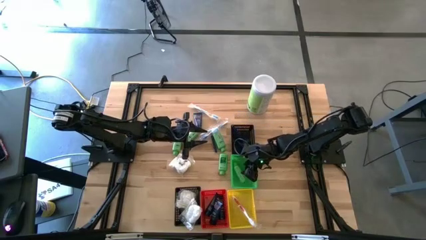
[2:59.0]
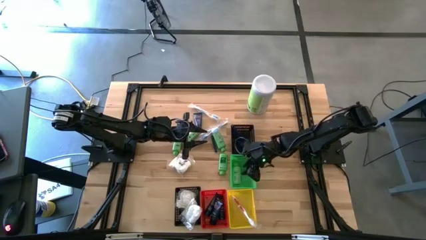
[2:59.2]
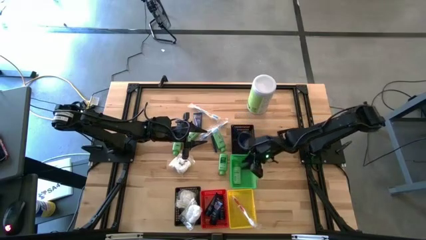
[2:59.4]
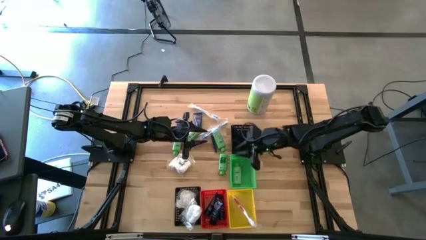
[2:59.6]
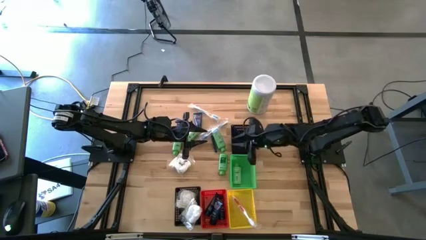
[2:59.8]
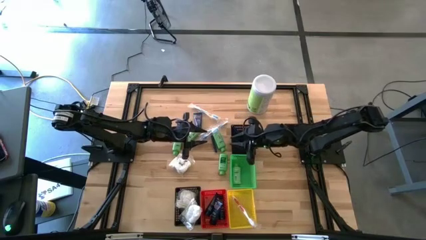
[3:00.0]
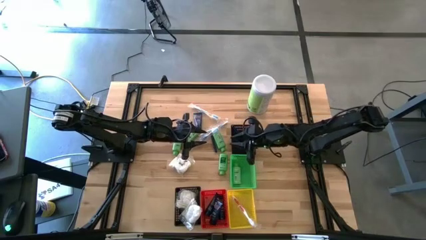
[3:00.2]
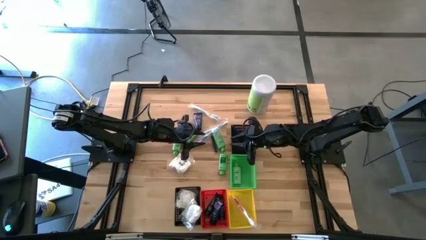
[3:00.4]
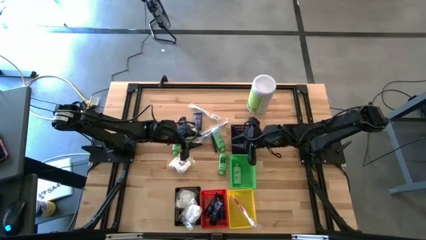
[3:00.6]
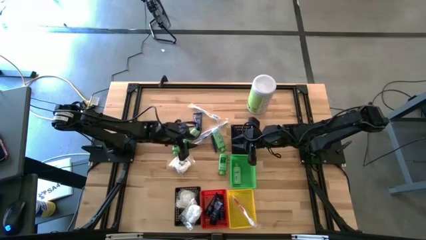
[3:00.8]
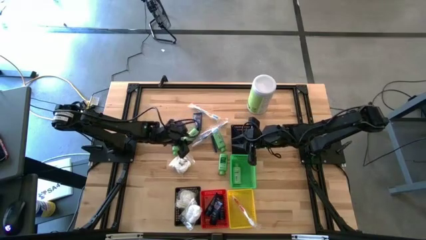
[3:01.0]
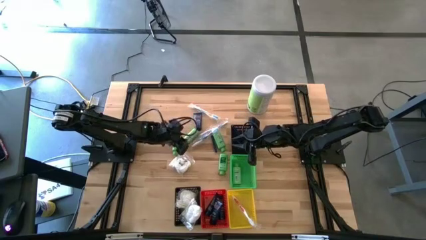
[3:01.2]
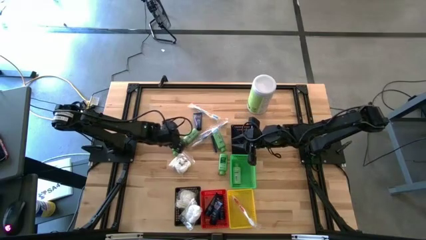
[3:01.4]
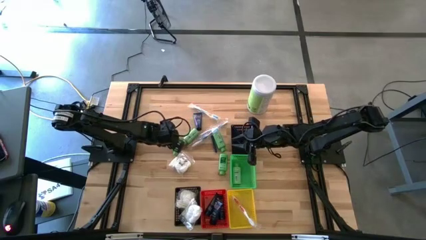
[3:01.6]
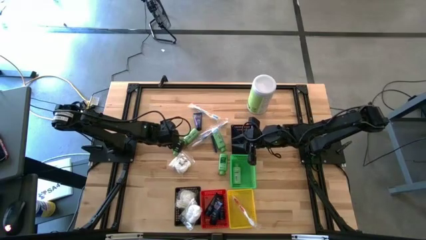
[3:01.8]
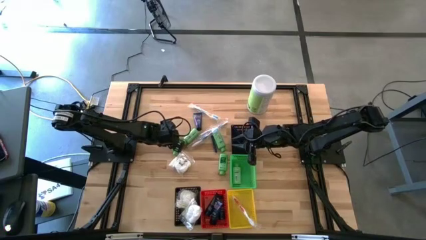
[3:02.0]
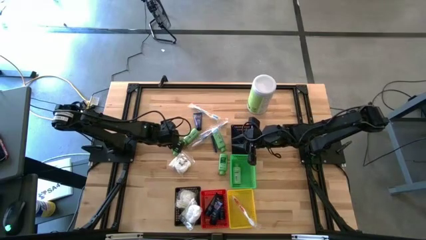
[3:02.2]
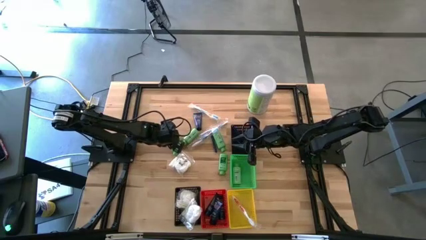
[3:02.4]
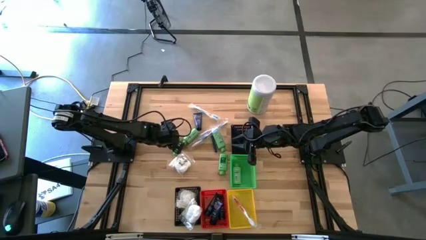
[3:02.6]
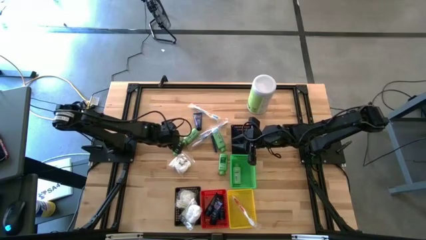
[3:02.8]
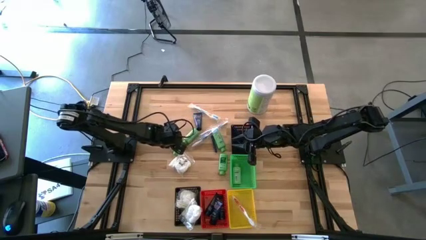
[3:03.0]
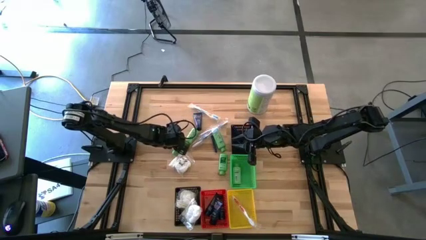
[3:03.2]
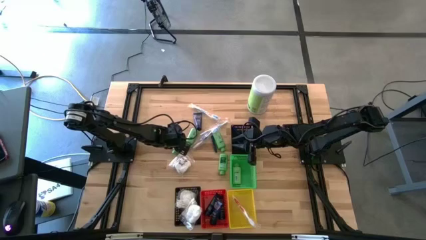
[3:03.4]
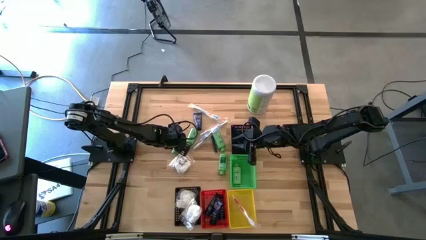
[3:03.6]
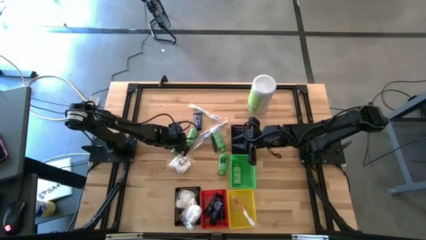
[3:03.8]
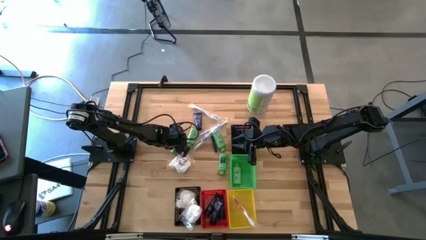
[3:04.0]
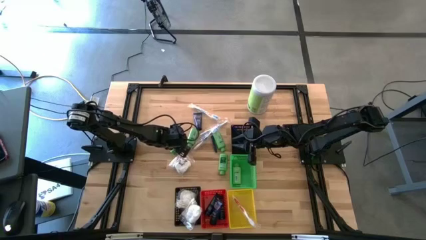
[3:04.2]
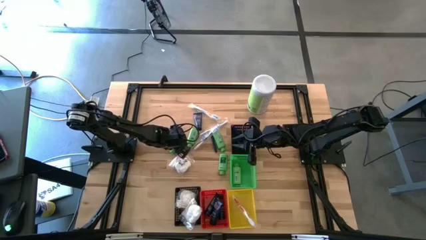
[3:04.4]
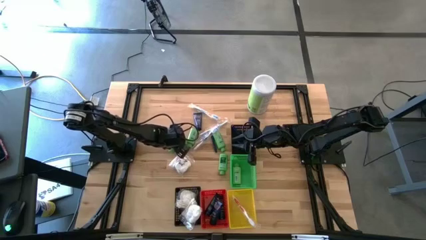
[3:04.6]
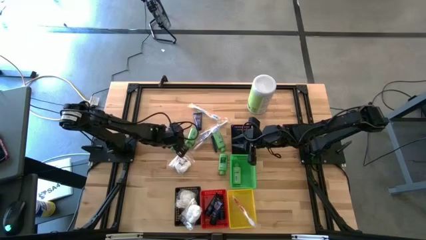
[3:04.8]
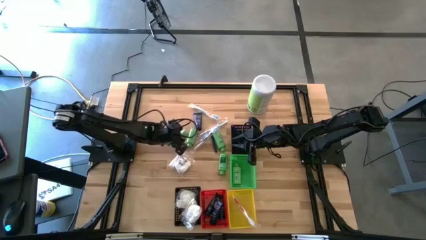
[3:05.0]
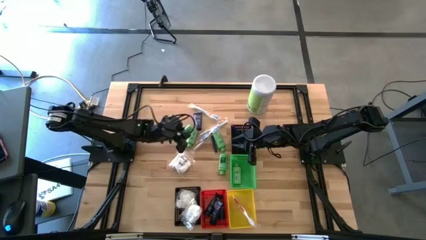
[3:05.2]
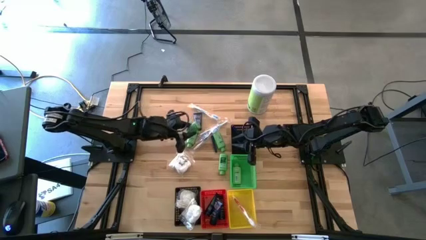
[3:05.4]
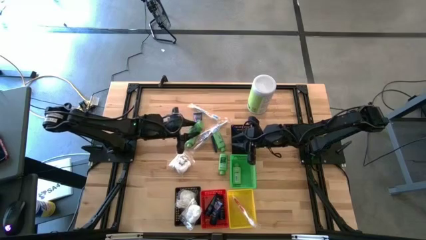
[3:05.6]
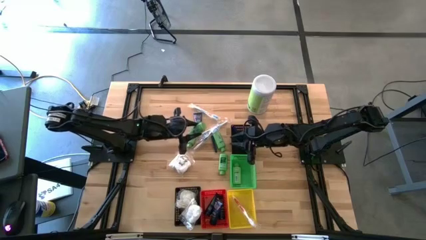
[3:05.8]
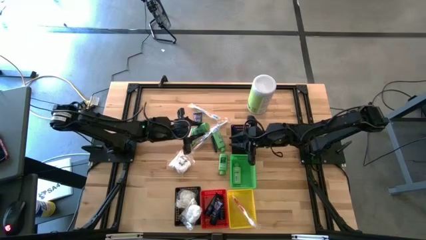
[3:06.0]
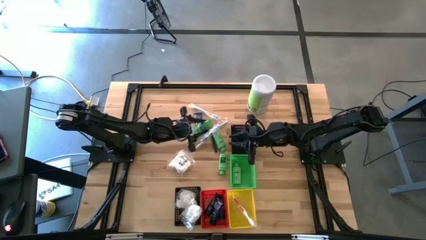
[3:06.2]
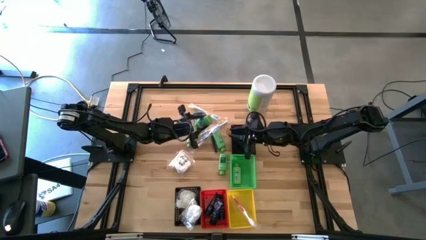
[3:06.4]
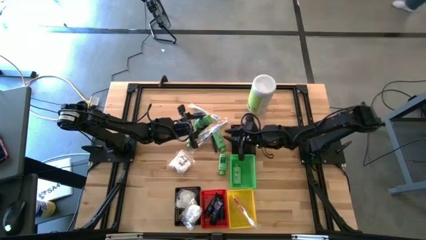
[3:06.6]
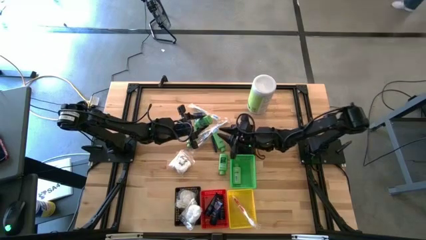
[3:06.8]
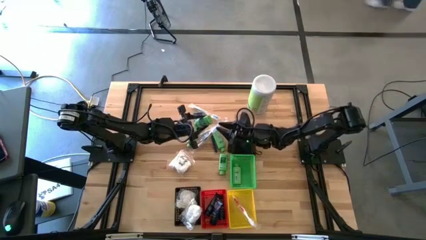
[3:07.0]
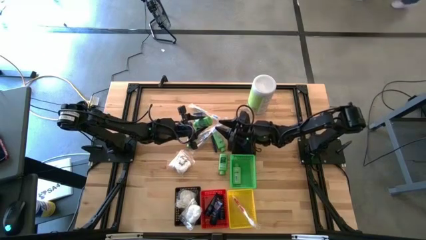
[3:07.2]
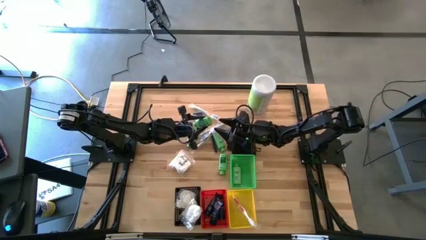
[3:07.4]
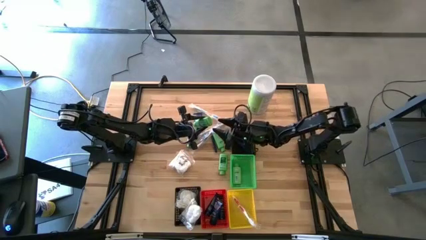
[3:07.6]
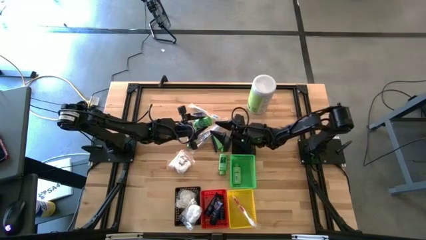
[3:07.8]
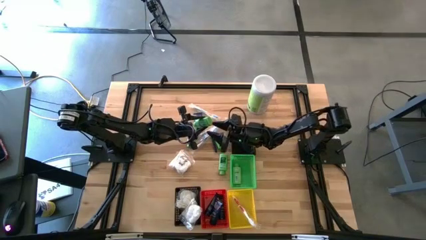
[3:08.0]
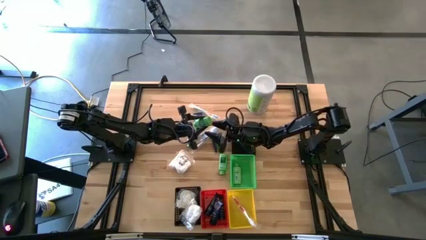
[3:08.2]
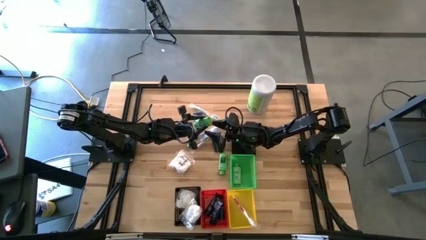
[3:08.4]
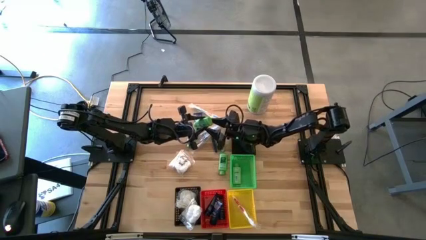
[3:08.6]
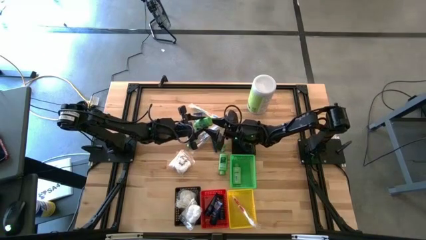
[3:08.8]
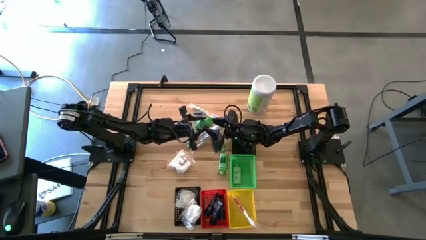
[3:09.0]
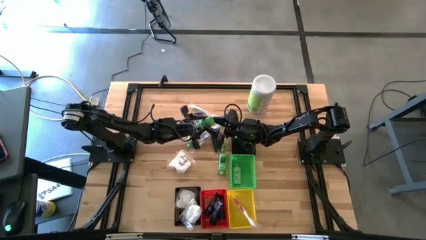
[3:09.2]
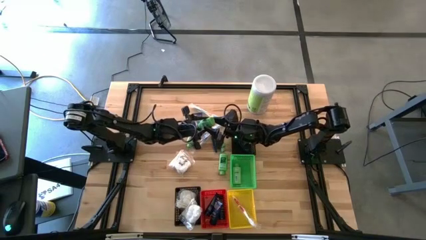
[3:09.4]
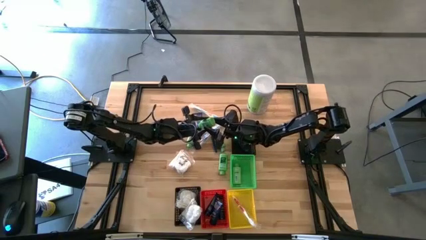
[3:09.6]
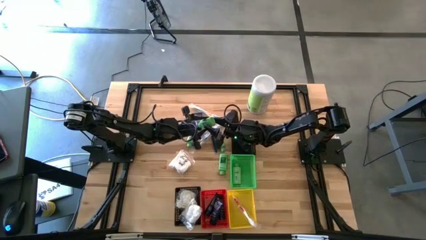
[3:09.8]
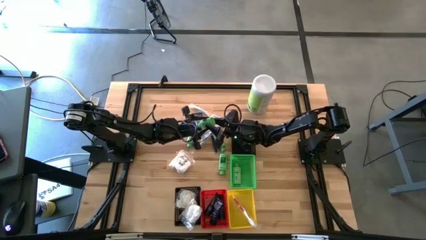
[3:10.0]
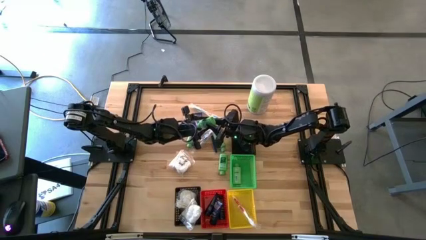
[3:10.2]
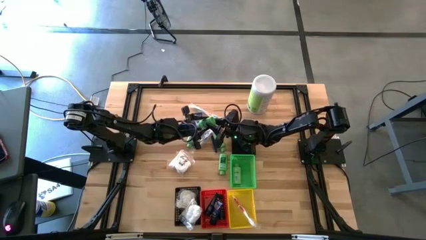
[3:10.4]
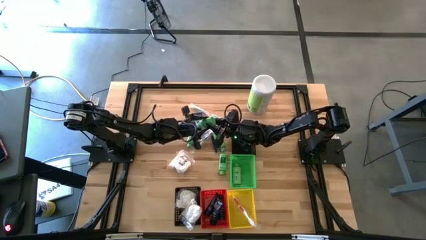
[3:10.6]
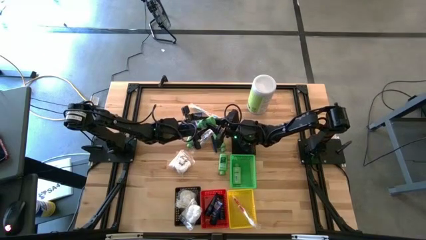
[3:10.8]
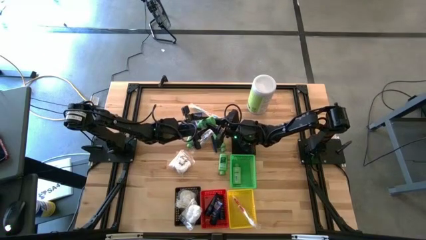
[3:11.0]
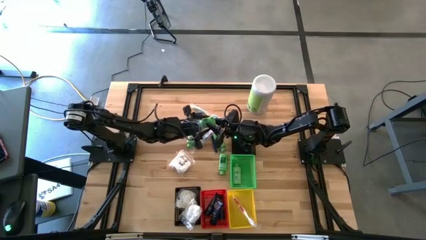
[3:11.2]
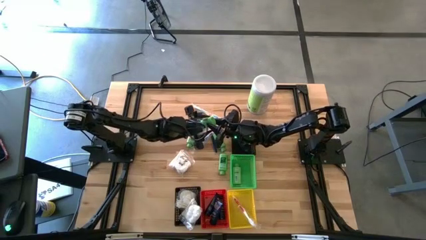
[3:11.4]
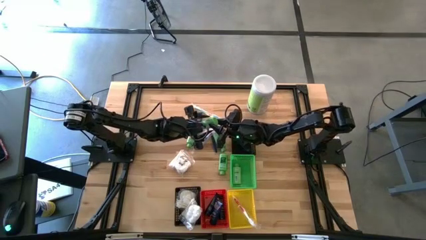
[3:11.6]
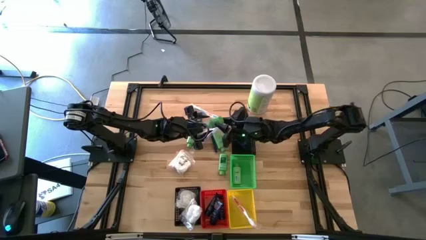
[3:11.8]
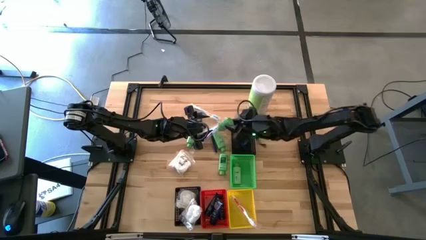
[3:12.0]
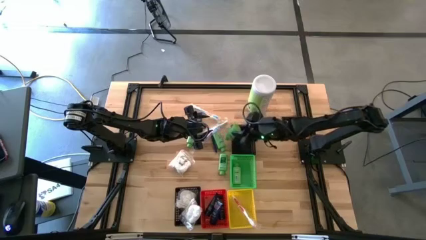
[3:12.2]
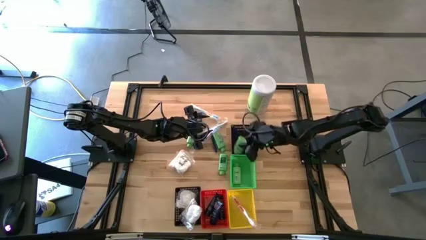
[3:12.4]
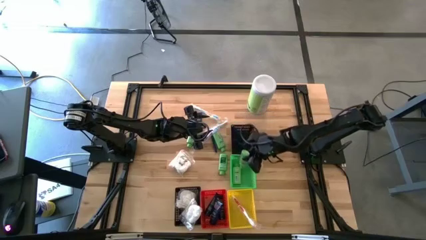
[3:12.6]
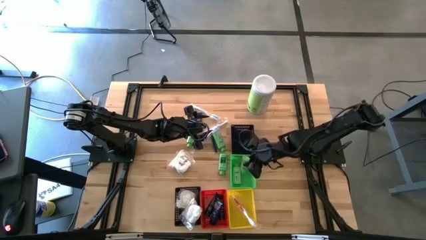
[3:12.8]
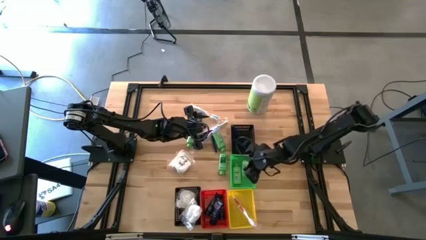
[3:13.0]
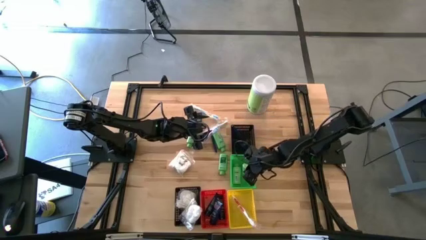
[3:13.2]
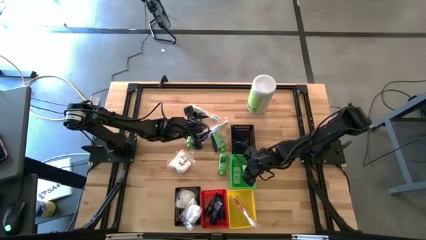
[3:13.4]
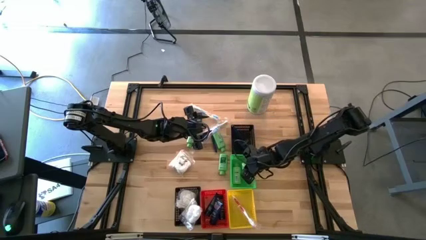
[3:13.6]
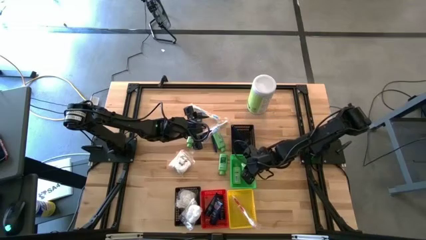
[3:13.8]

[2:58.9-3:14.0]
Task: Pick & Place Travel size toiletries
Put the green shampoo into the green bin

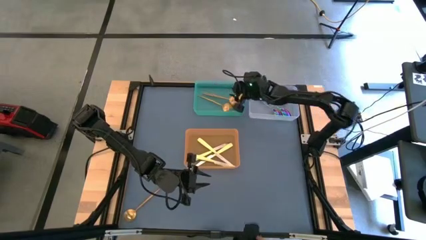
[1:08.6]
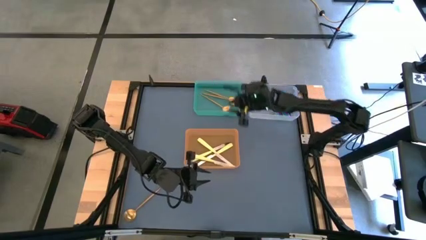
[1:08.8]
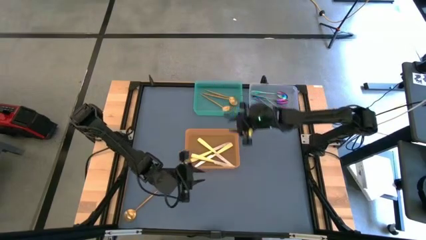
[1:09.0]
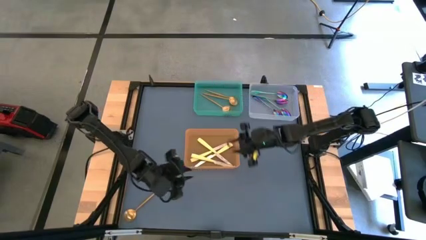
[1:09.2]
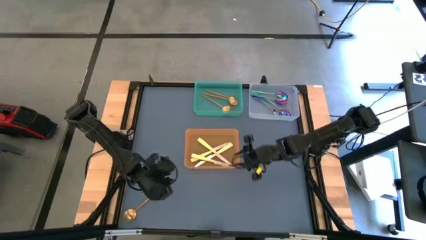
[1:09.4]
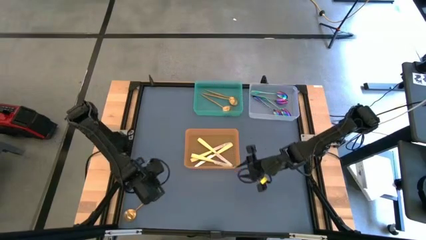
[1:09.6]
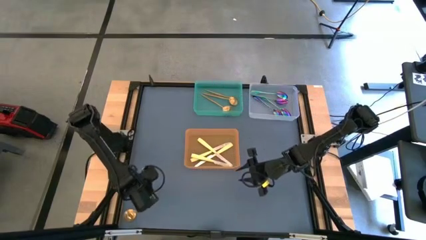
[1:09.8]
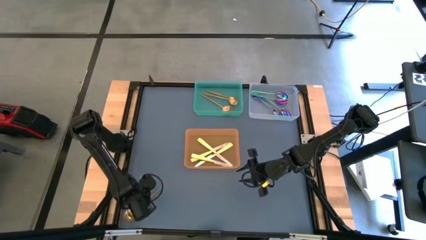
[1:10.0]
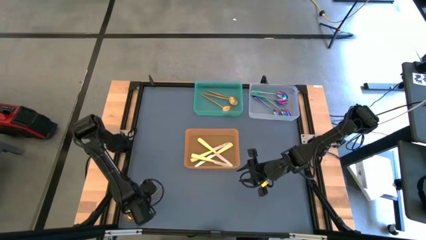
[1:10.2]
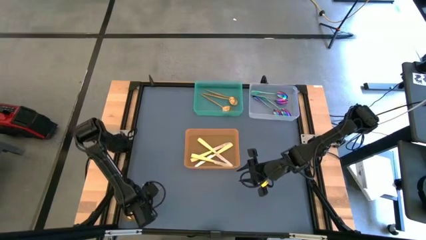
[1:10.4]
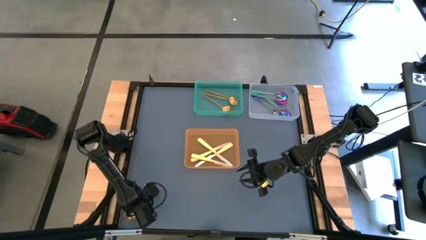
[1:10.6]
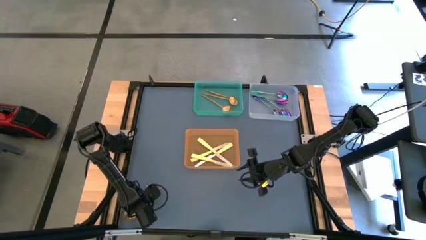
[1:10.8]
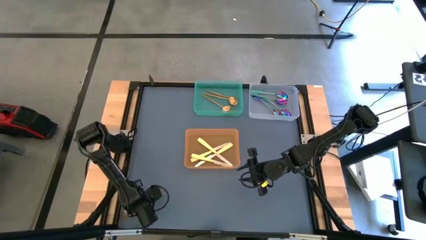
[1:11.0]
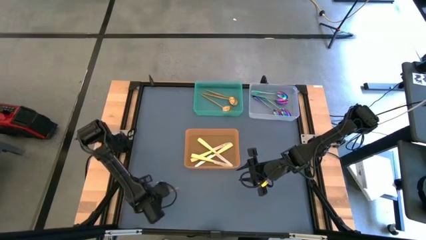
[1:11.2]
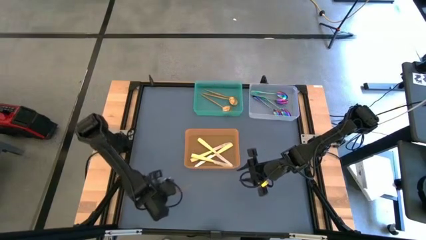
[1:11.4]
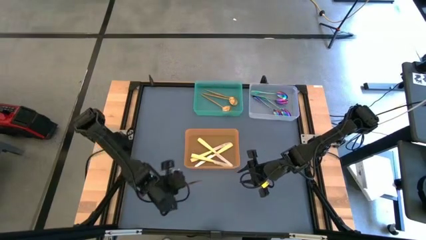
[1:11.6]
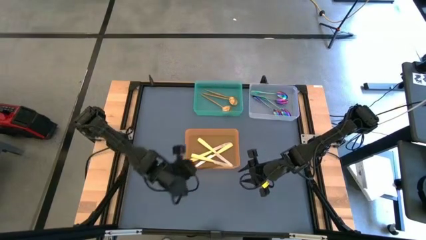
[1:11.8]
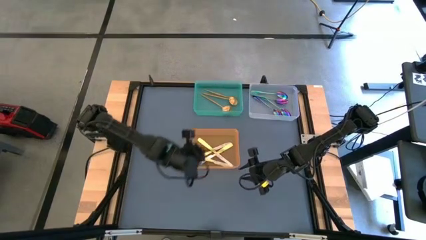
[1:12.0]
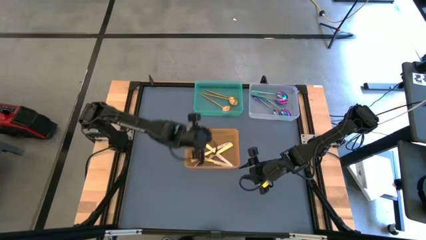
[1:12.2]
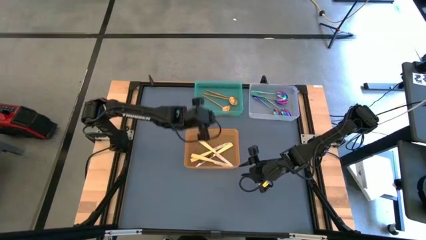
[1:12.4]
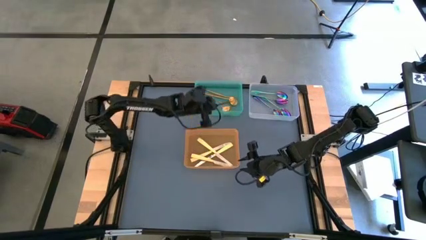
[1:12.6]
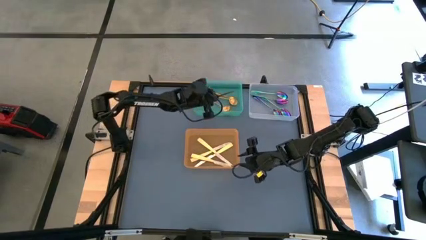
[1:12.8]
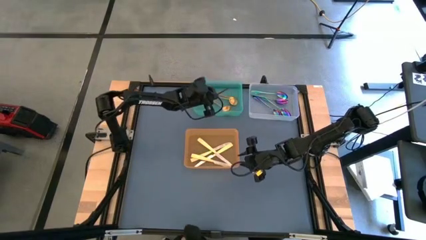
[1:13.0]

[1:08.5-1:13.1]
Task: Sort silverware by color (type)
Put the gold spoon into the green bin
